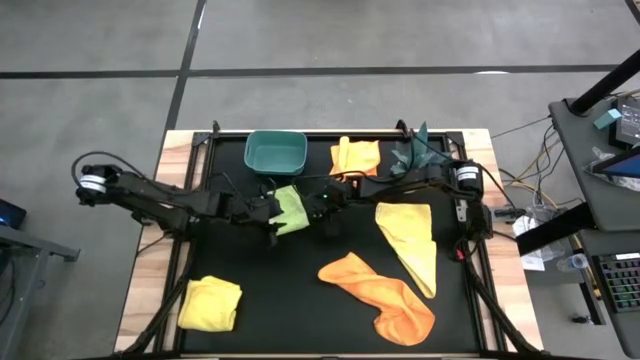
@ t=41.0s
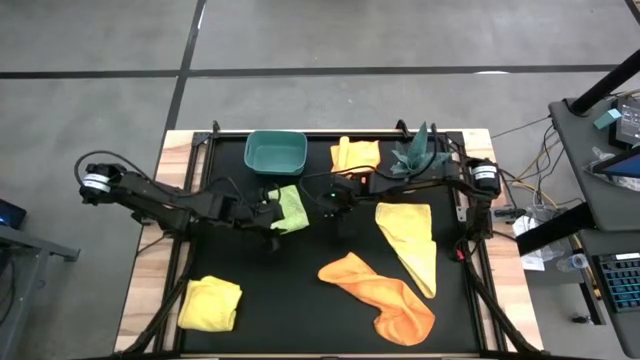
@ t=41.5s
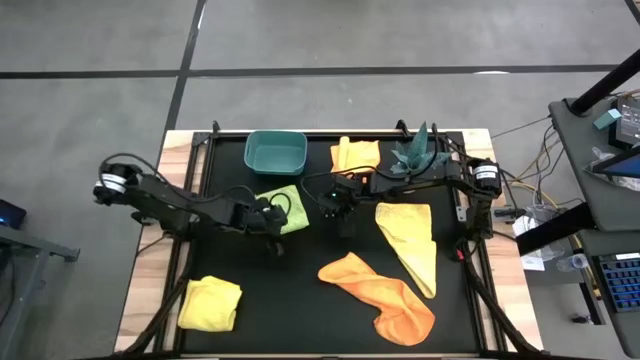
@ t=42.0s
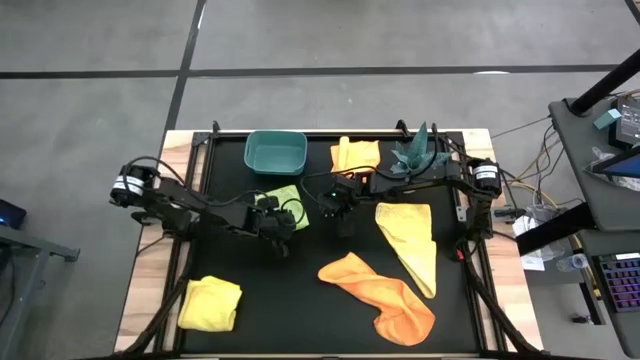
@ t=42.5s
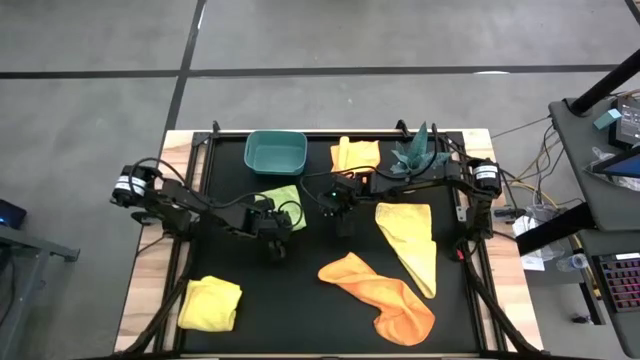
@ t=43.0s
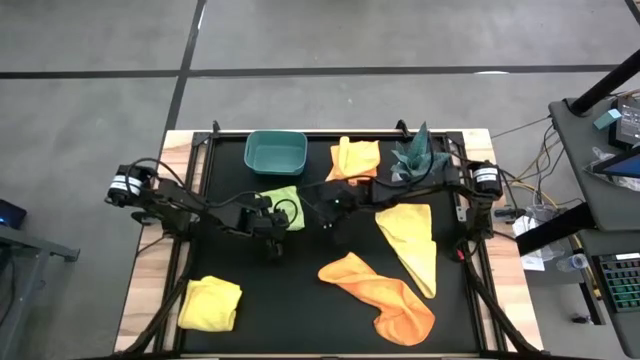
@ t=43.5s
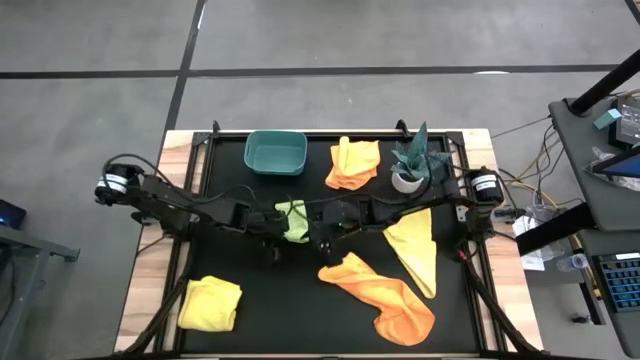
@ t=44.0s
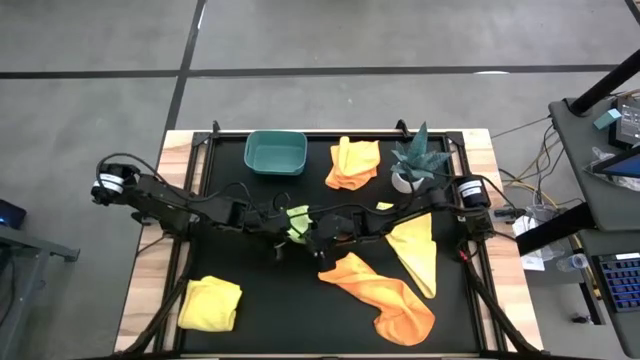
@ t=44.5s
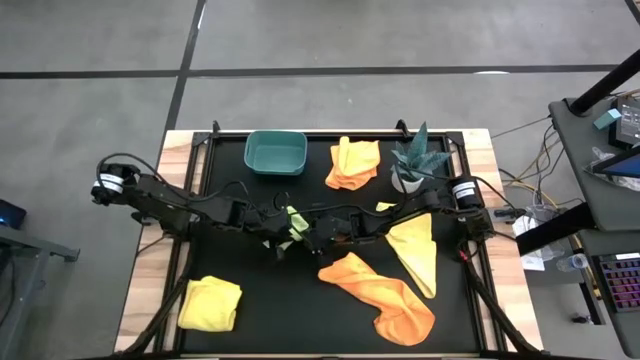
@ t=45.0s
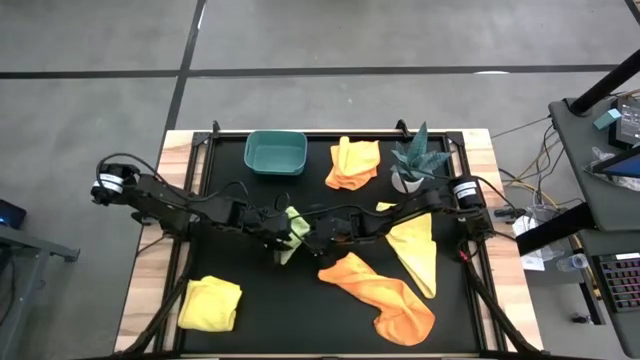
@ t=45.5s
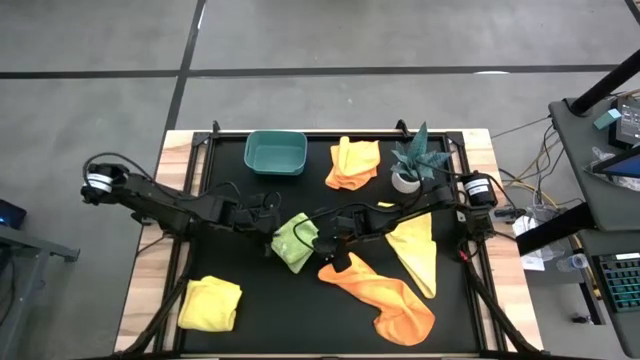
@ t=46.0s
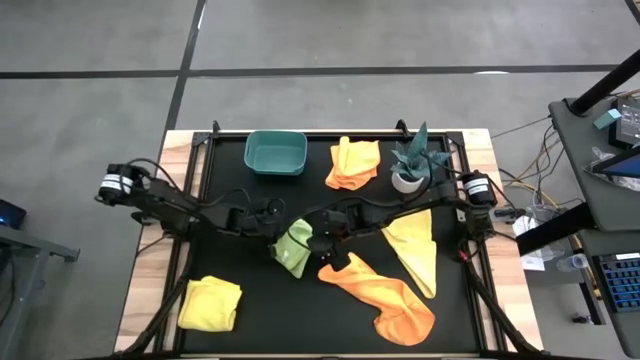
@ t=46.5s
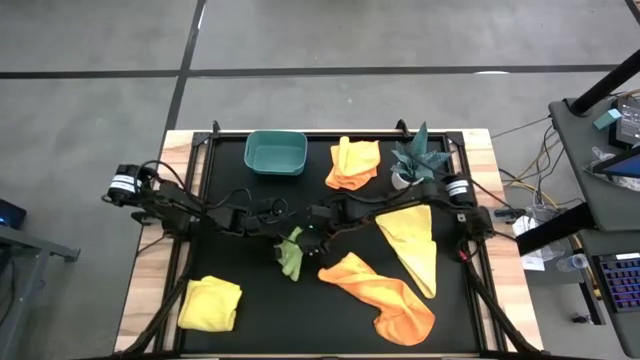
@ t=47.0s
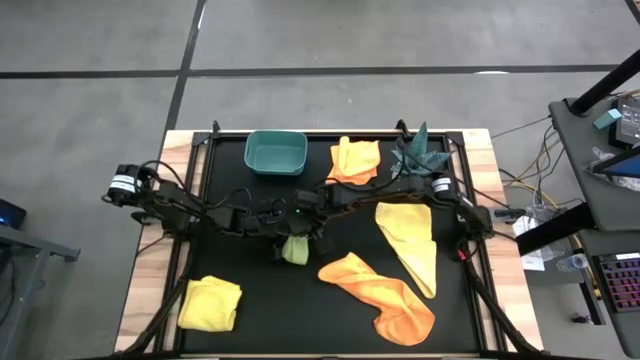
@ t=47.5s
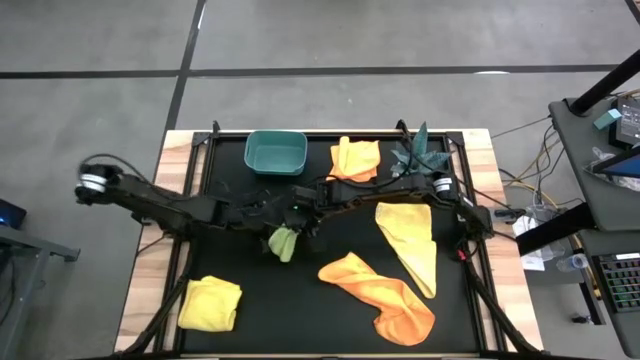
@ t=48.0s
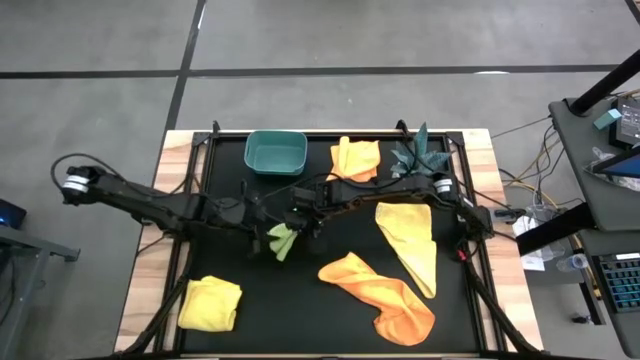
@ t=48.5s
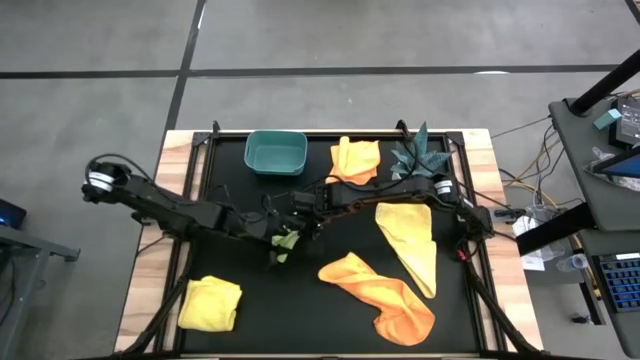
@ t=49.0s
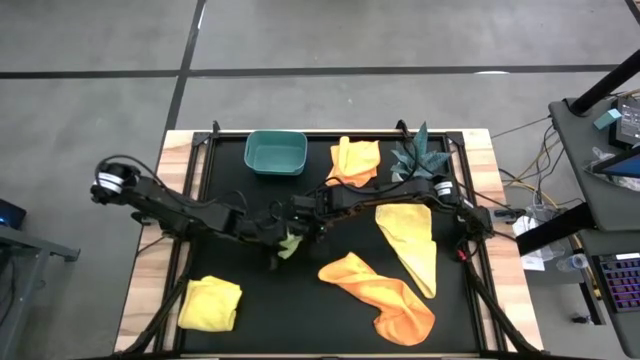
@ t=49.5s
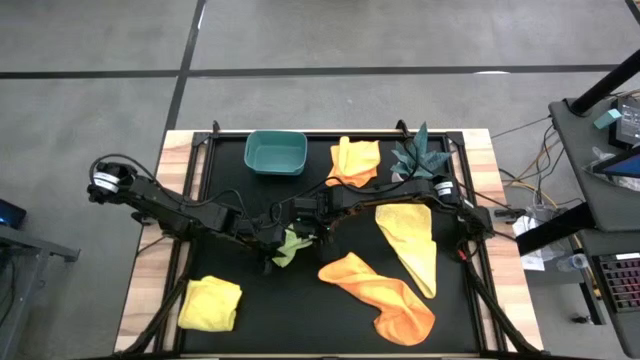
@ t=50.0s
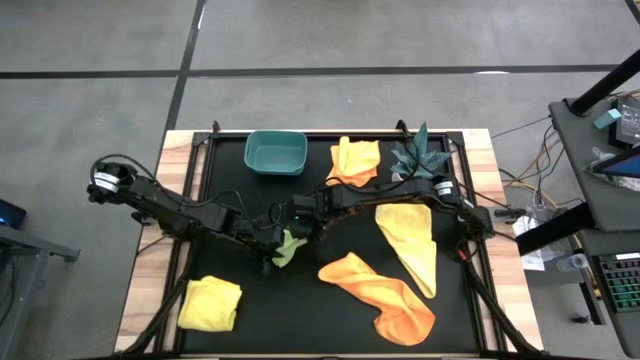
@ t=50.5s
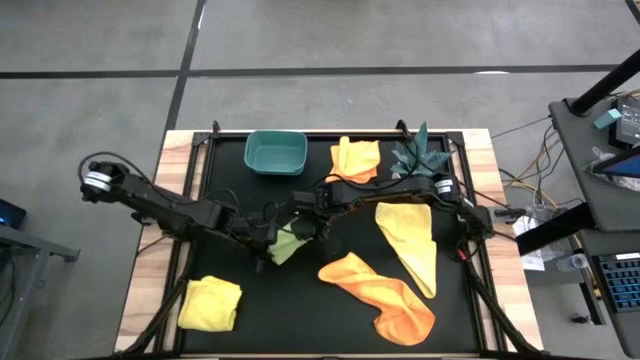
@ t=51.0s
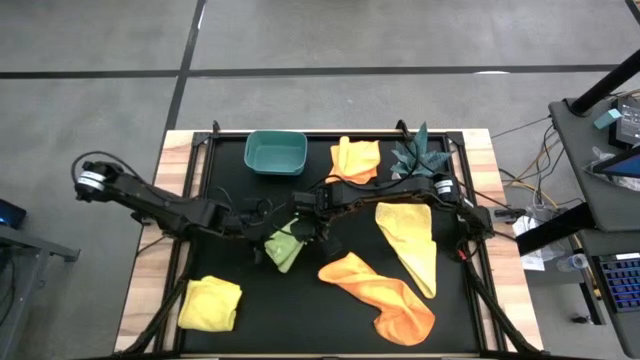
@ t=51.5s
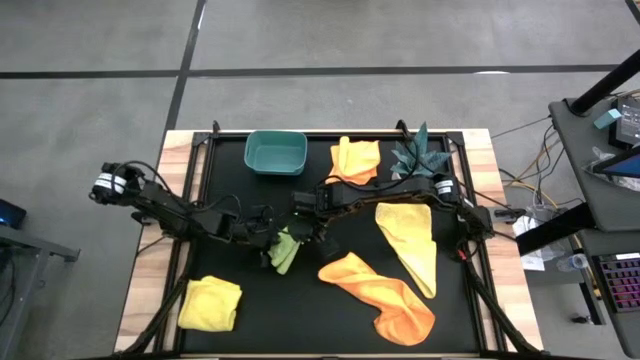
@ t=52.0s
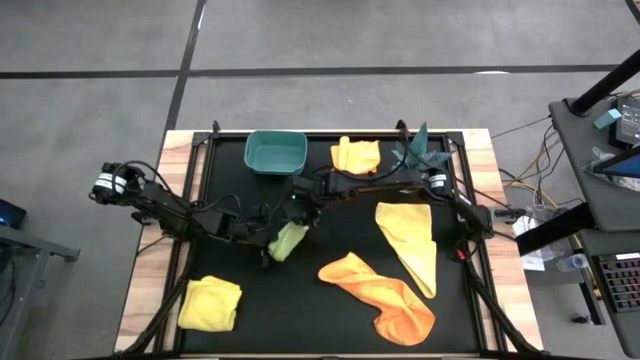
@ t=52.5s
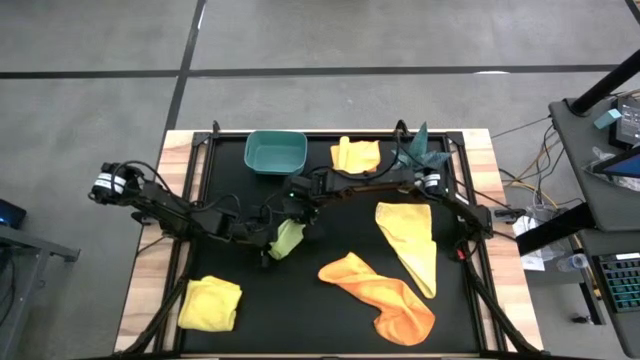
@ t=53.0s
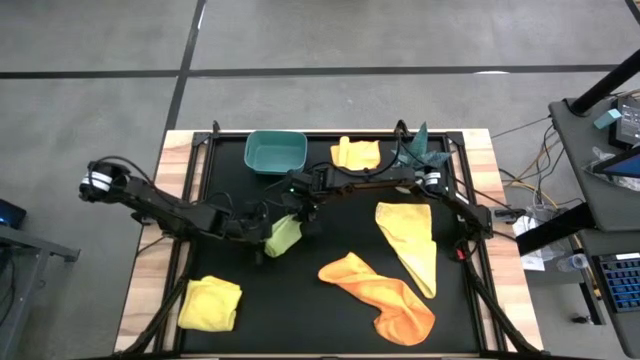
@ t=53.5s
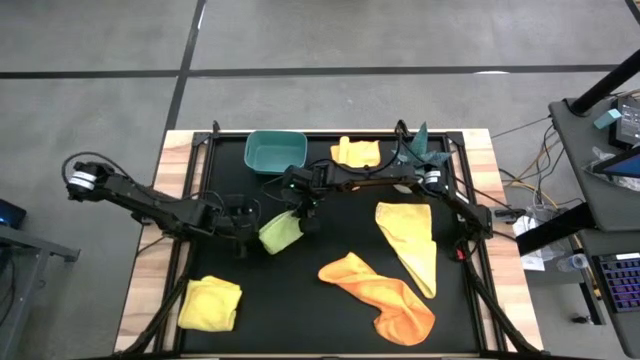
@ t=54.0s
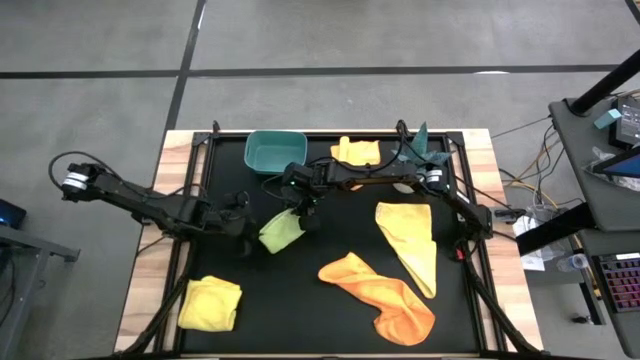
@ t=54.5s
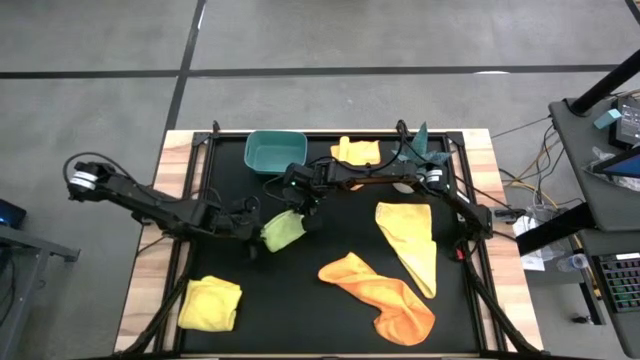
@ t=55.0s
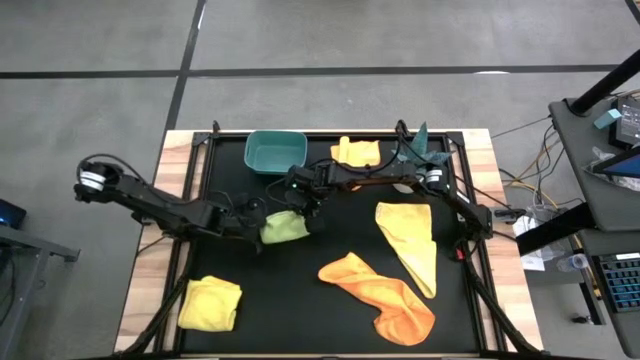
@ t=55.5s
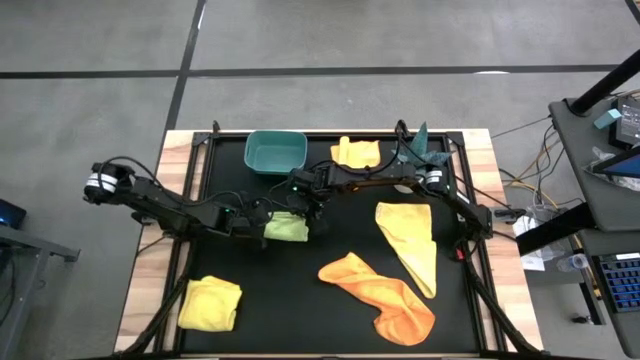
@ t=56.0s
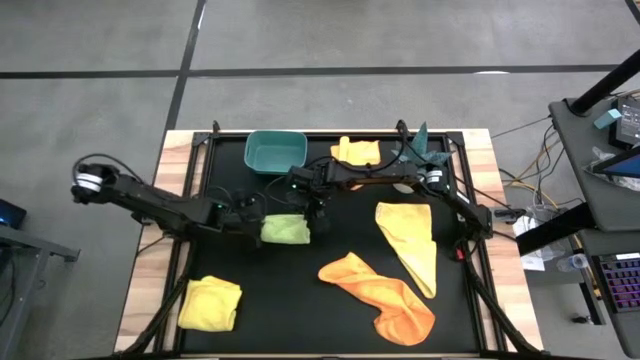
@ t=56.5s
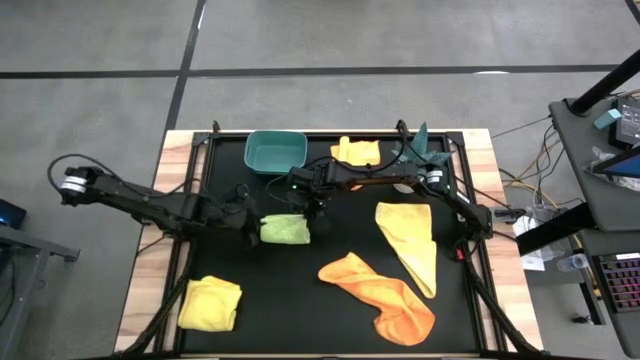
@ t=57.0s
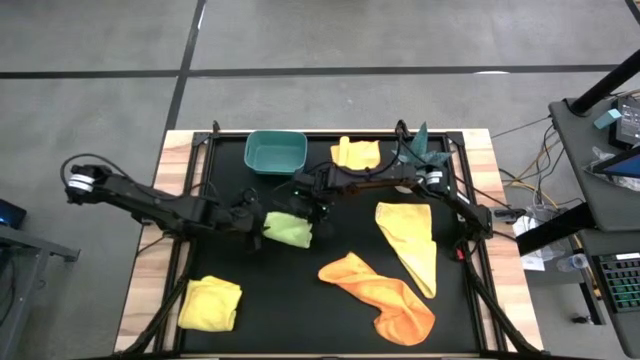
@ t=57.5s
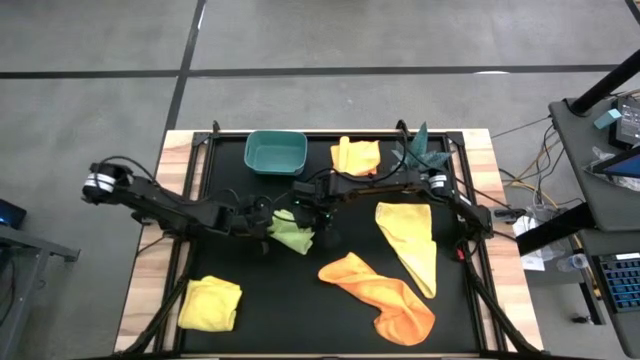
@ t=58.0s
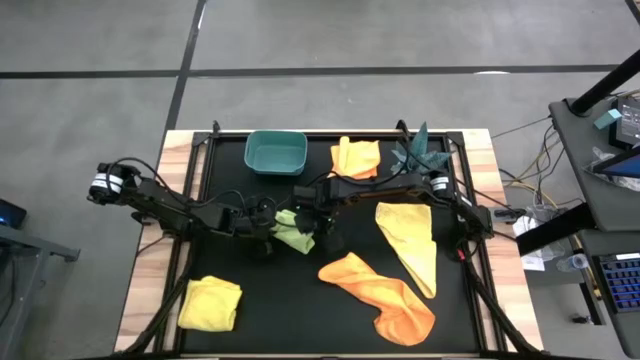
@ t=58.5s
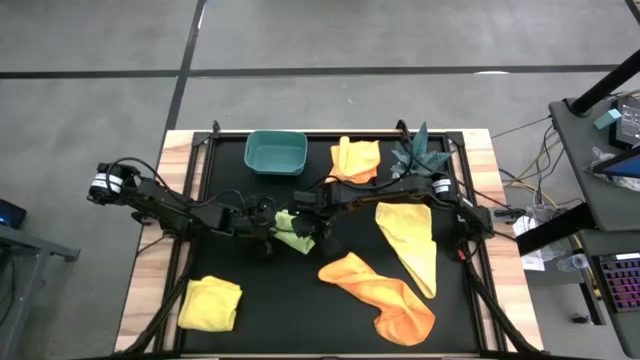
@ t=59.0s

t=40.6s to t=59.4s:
Task: Fold microfiber towels
Fold the green microfiber cloth

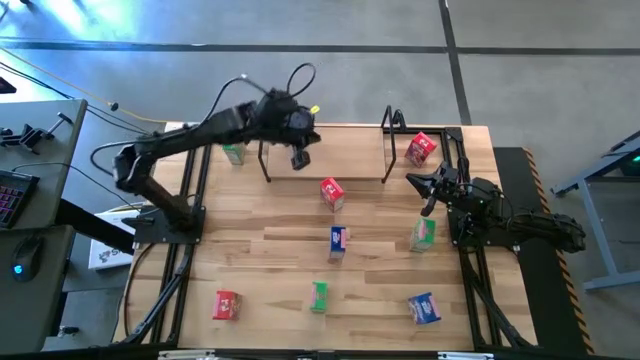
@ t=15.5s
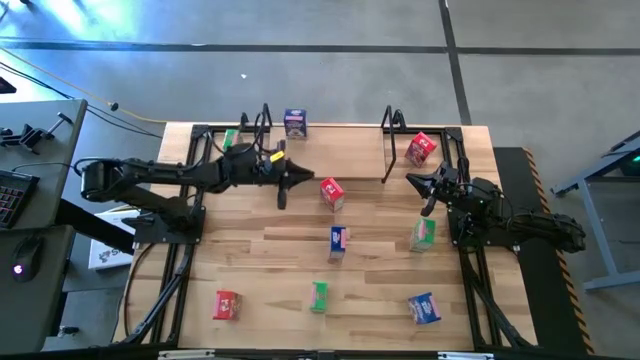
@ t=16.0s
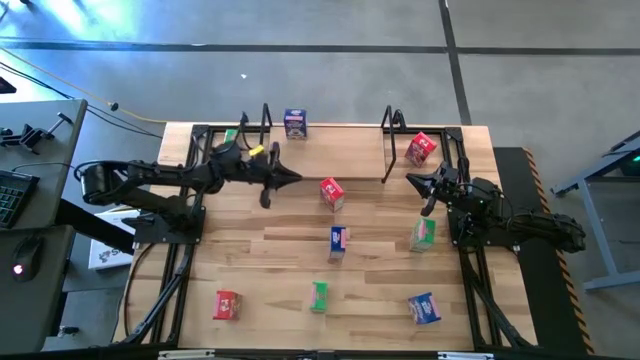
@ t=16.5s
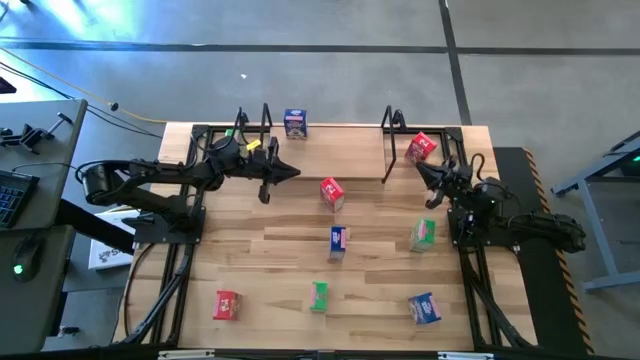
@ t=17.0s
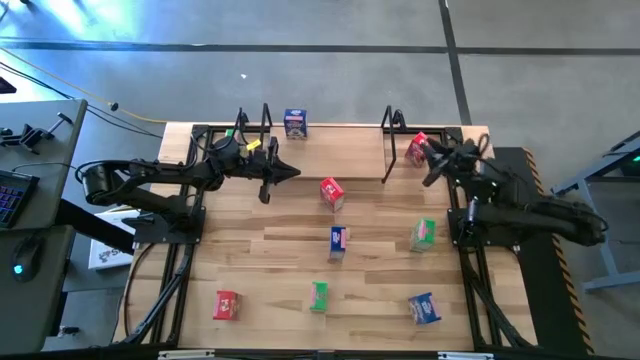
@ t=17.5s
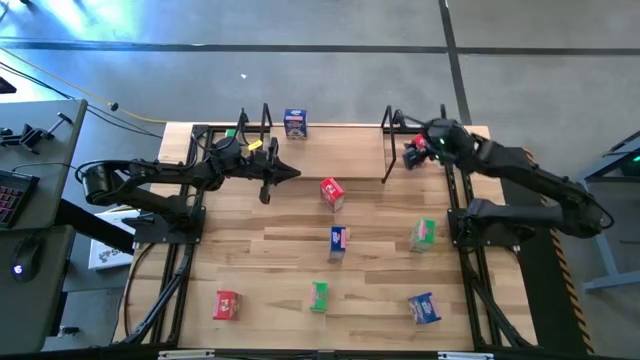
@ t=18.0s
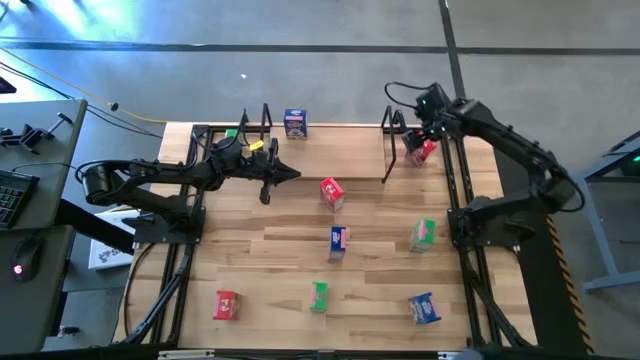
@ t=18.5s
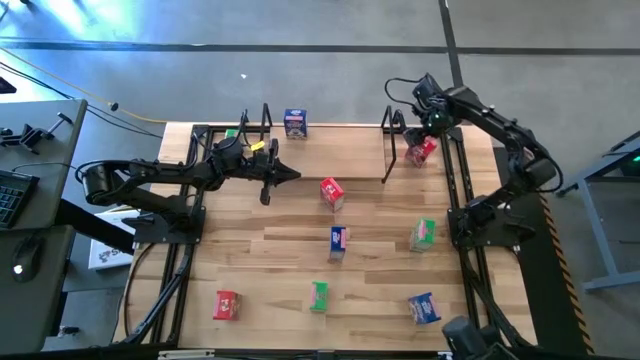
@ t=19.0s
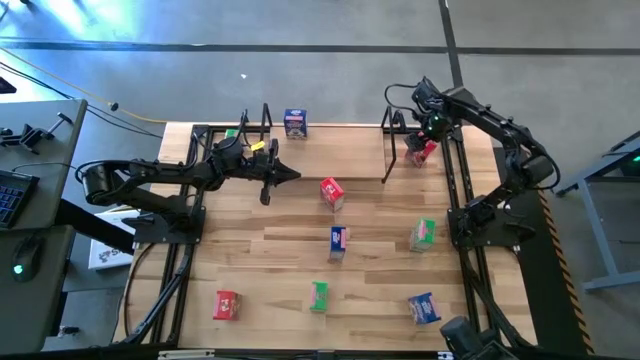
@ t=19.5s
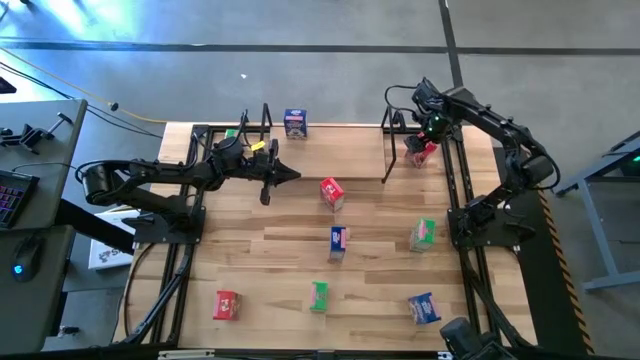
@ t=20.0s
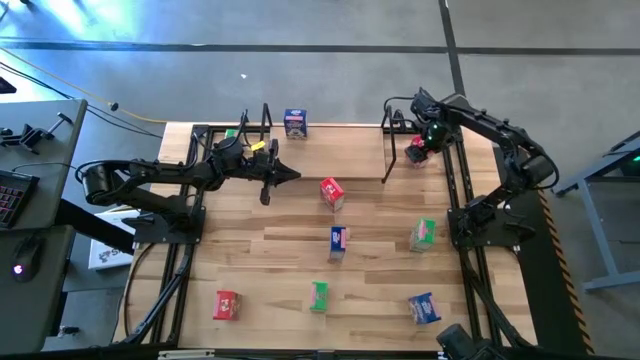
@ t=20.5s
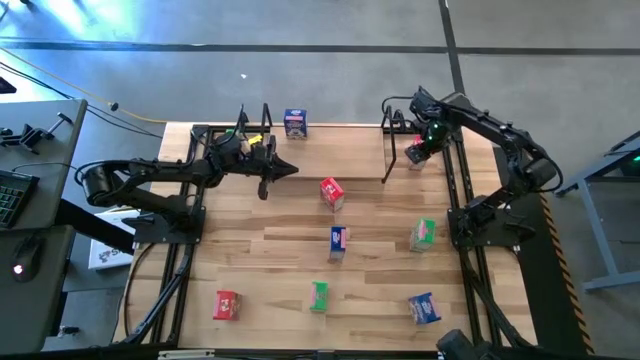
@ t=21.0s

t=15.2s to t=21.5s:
Task: Stack cereal on shelf
Put the top right red cereal box on the shelf
